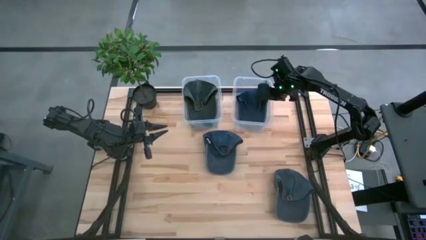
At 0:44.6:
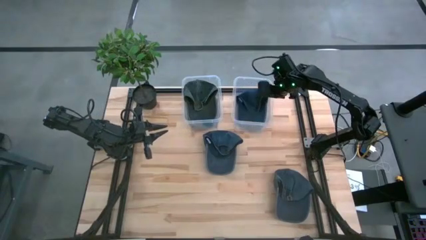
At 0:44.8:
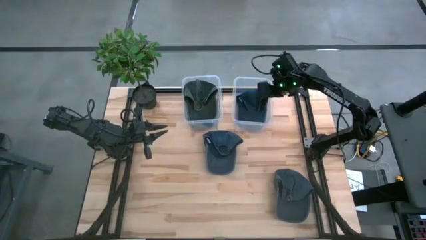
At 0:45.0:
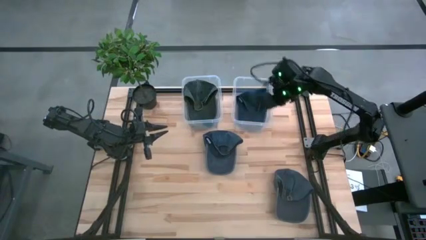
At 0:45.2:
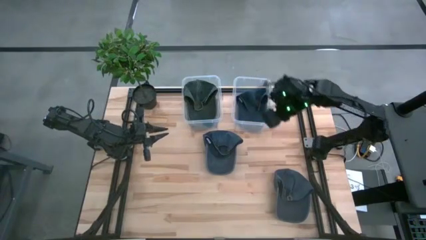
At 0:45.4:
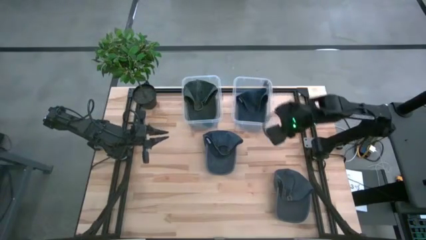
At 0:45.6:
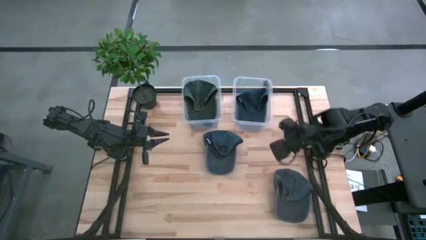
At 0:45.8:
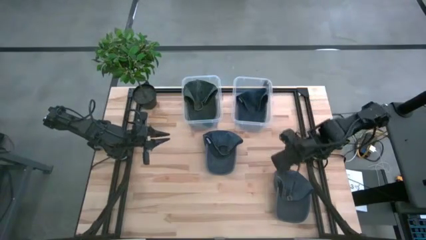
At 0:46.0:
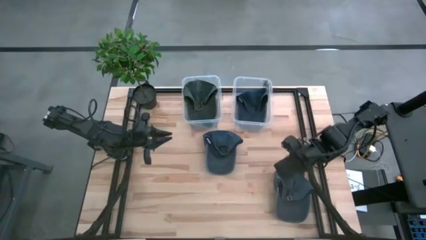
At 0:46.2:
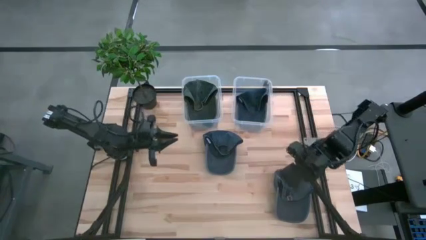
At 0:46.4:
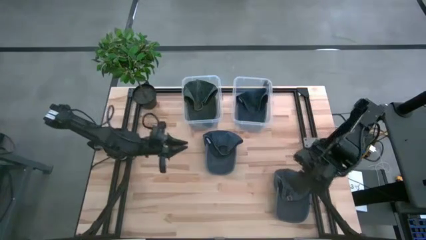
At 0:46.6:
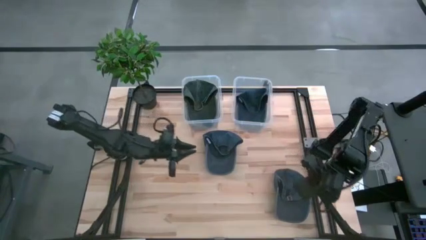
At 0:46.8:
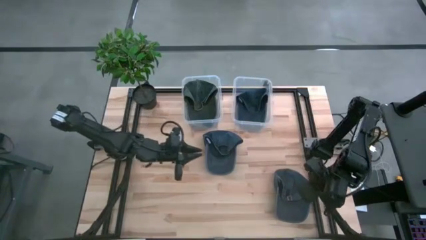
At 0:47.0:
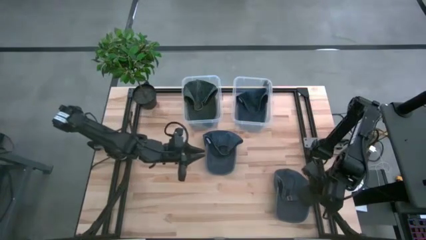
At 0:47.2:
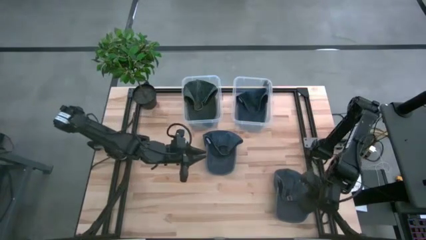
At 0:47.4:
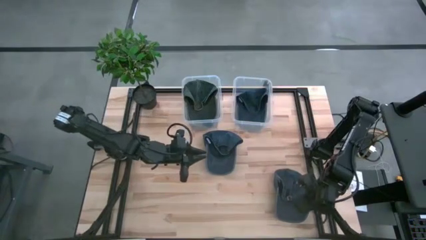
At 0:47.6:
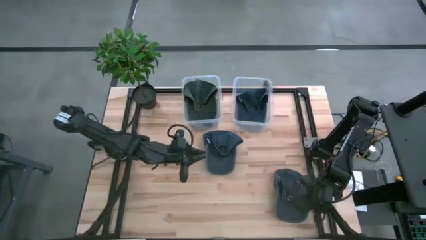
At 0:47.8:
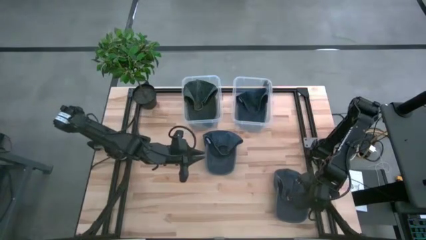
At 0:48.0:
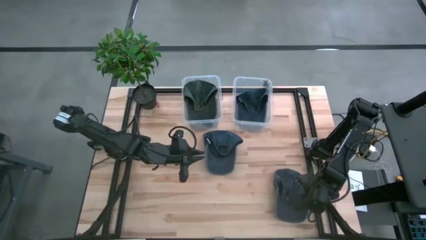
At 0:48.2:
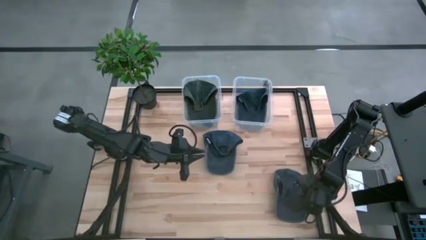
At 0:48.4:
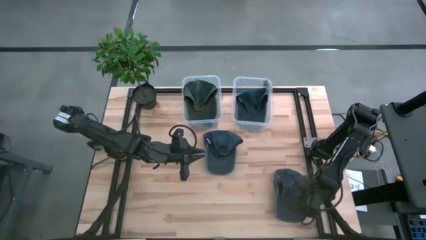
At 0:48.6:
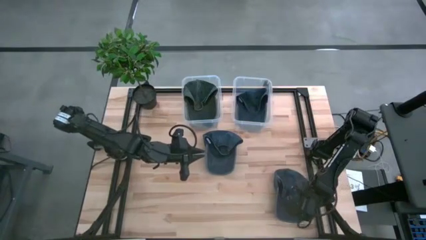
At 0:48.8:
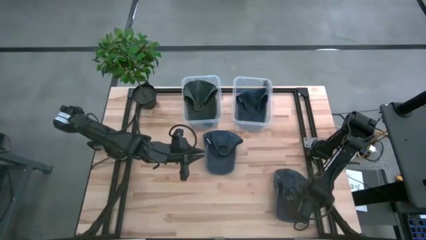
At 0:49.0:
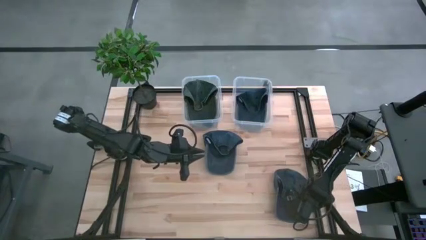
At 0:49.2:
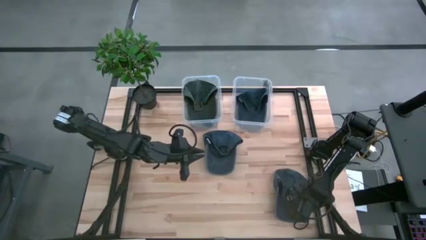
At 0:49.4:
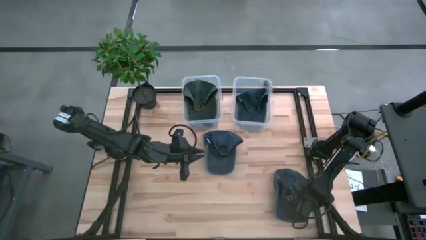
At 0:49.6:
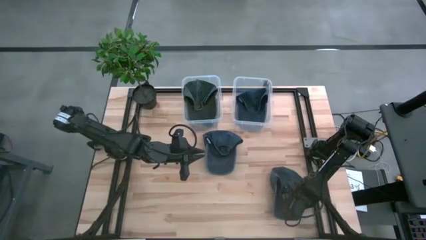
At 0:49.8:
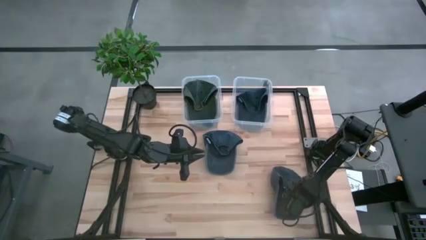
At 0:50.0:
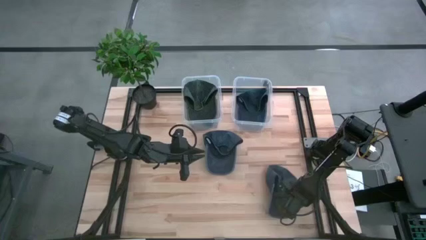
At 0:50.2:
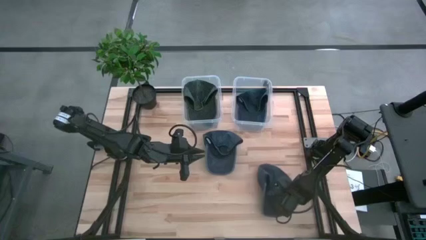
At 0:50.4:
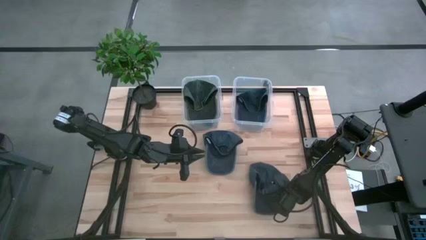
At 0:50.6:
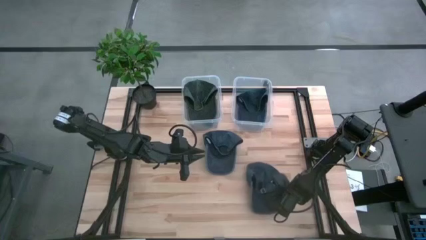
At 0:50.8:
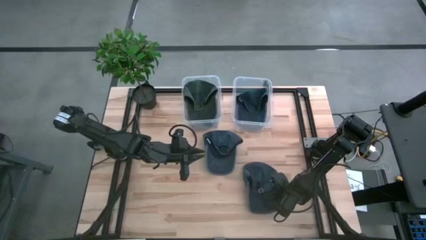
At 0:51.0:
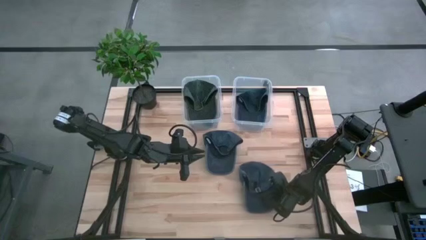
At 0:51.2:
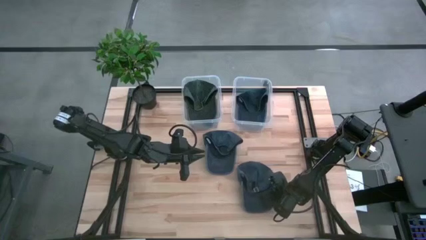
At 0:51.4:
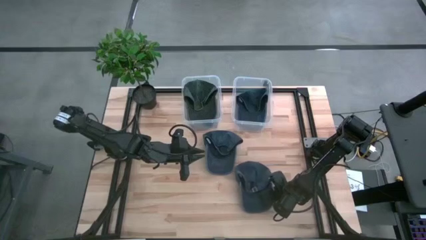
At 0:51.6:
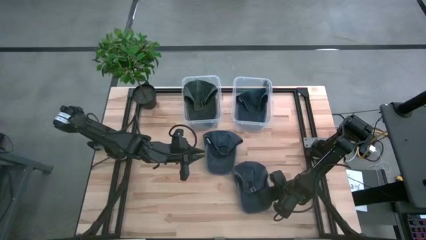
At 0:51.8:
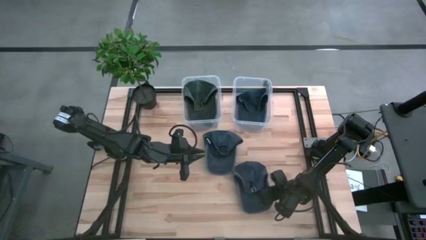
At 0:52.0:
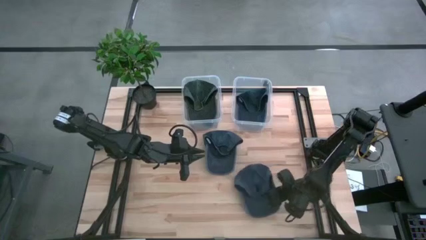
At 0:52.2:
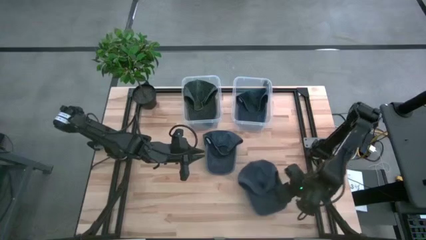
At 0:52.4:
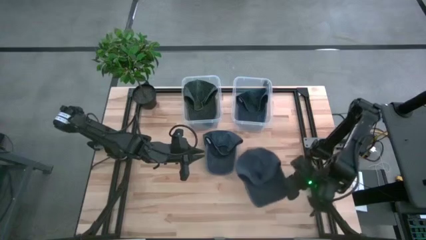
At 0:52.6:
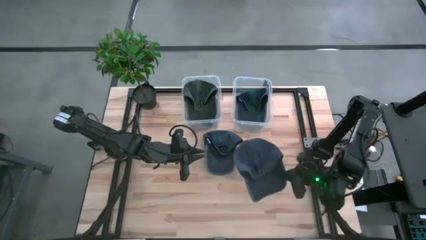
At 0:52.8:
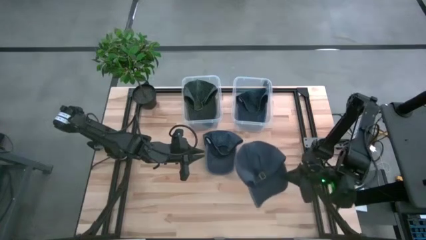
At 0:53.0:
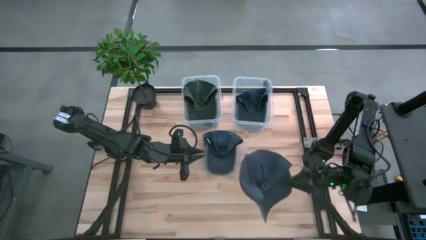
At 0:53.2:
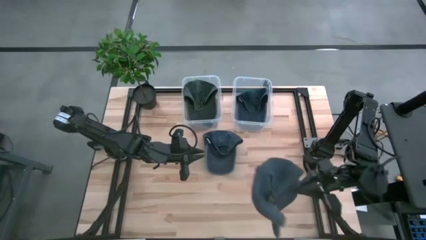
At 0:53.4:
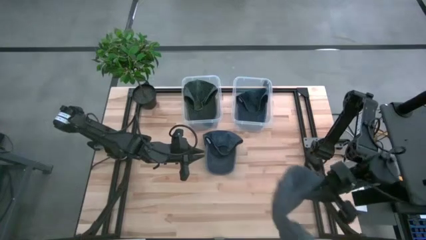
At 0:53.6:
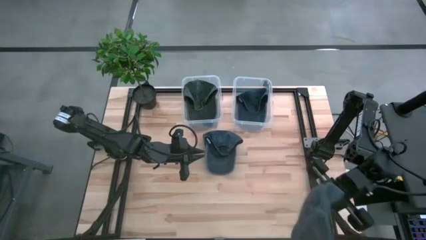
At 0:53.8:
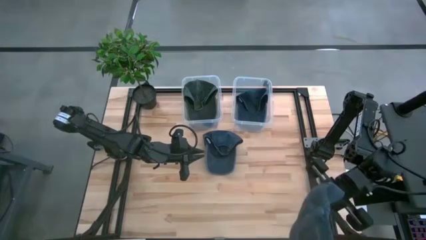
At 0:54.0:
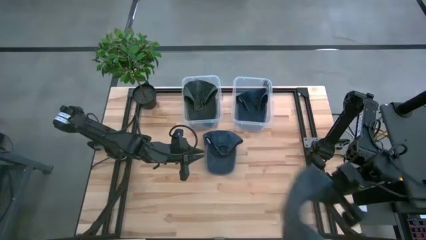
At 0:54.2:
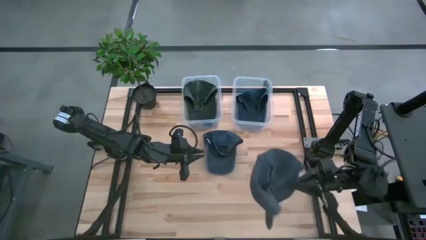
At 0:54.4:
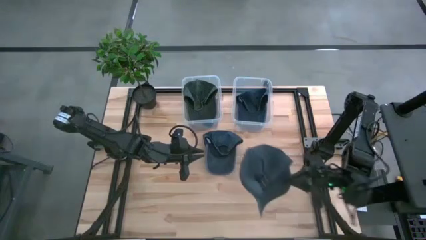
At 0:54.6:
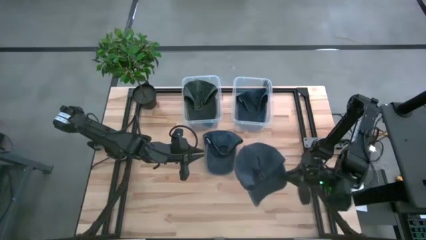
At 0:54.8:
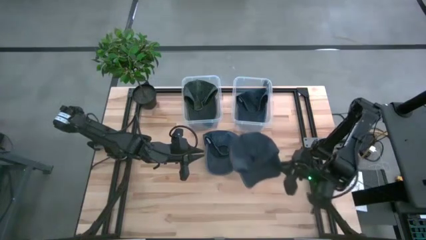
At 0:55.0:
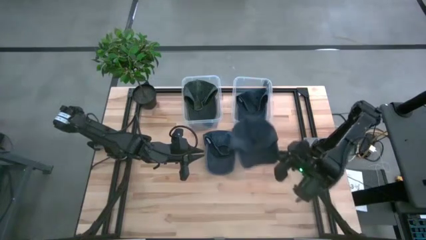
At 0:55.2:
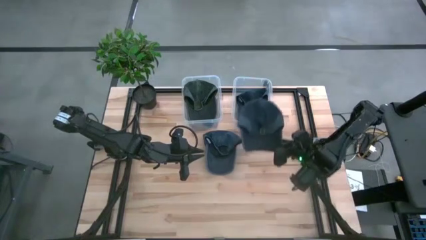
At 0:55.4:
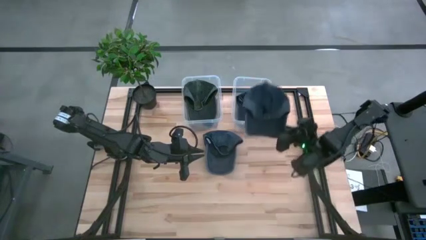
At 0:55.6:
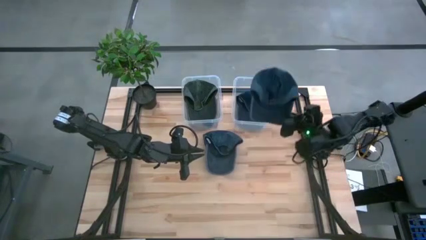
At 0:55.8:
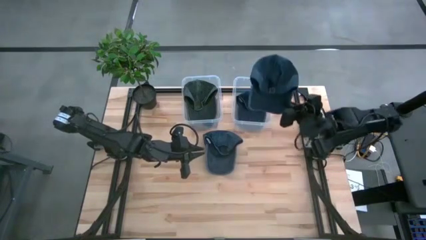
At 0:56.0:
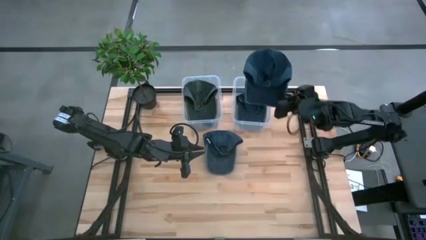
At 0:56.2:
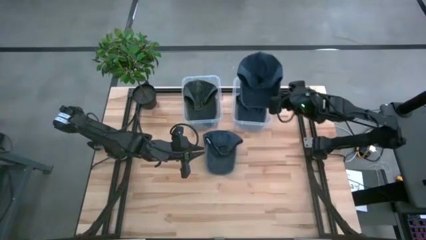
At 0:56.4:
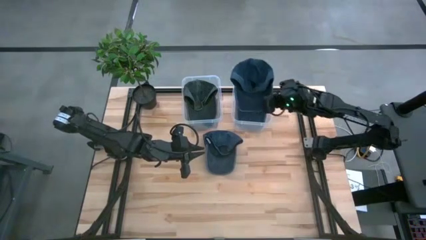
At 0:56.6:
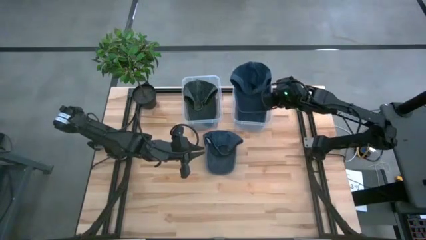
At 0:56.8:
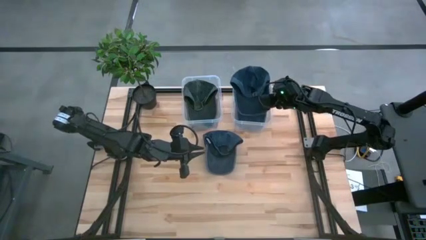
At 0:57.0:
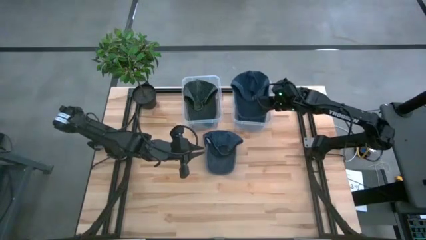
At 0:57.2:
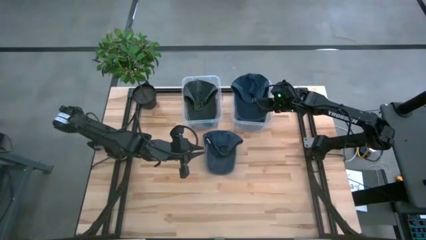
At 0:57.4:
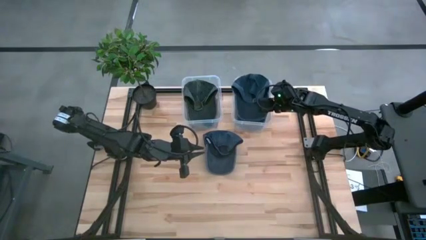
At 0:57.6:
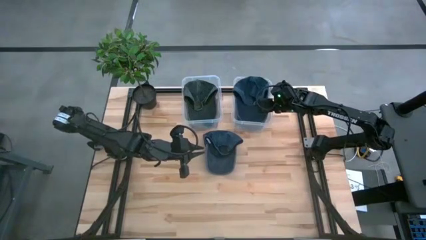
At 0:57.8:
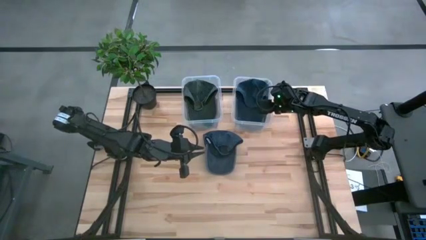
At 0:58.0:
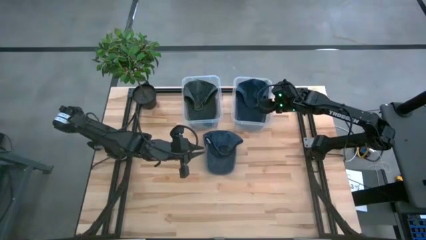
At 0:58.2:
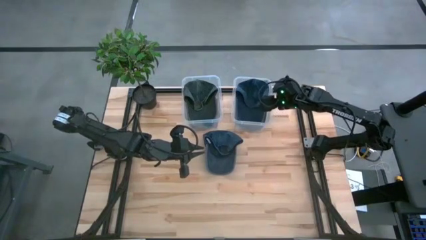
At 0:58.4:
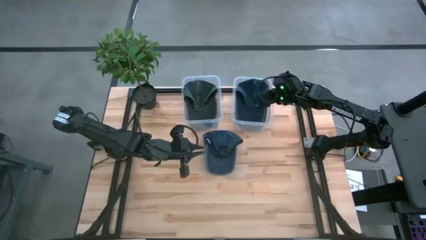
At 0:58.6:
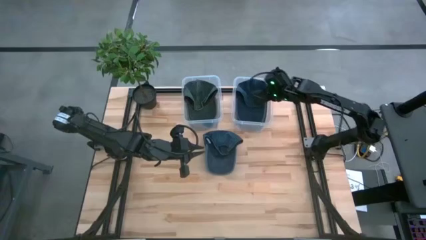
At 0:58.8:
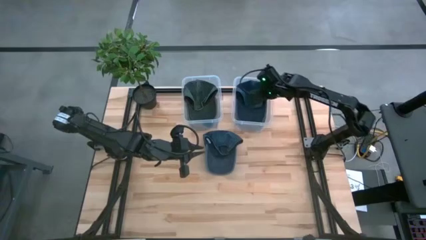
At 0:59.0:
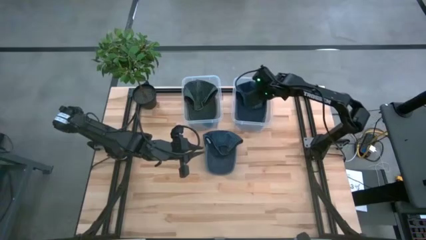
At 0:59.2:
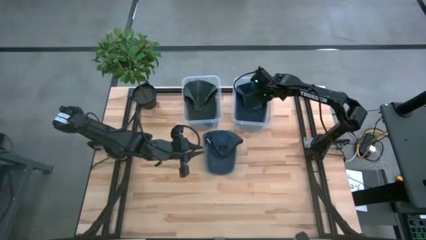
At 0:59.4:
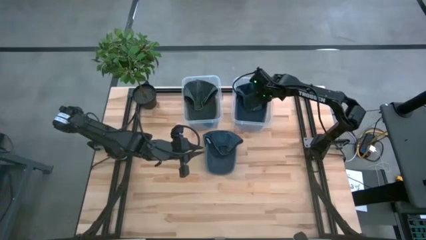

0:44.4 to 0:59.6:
Task: Pick & Place hat
Put the bottom blue cap into the right transparent bin
